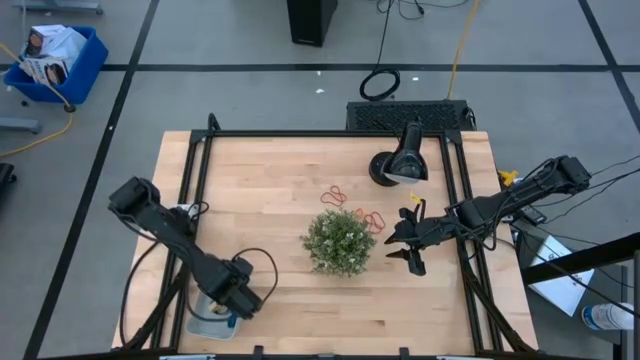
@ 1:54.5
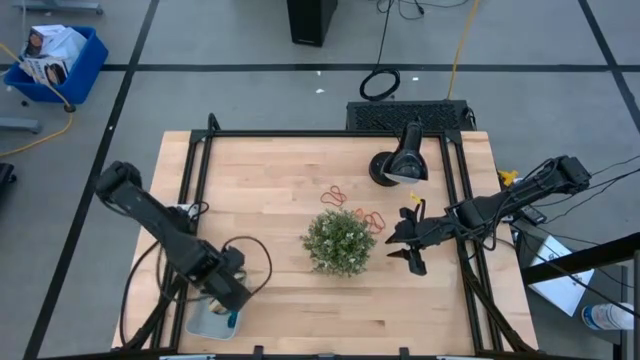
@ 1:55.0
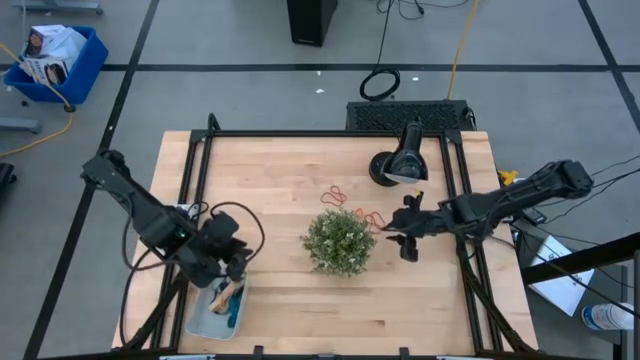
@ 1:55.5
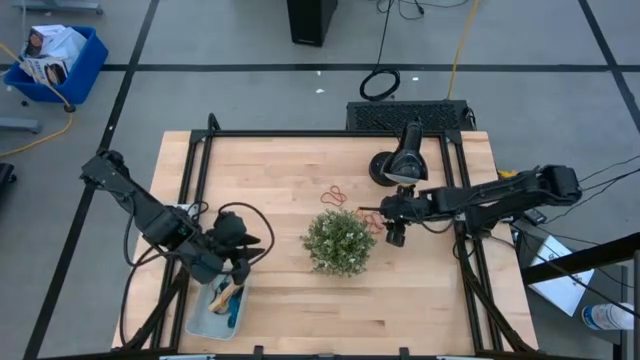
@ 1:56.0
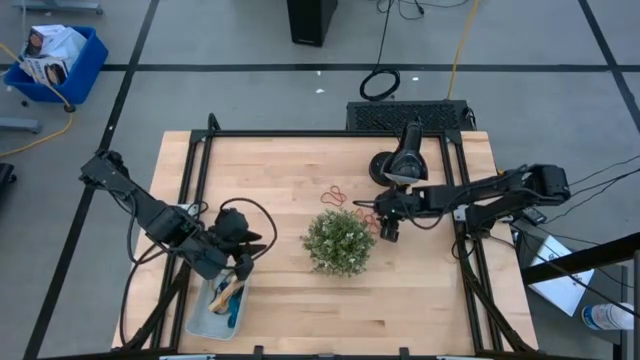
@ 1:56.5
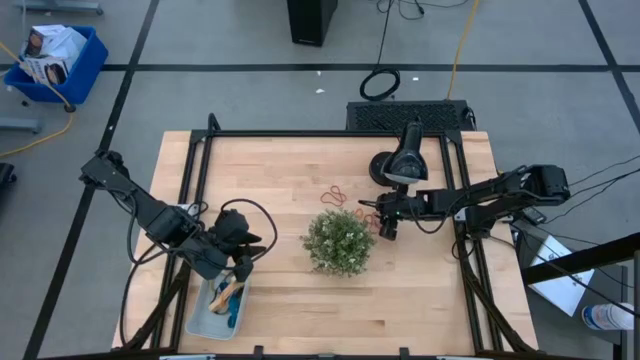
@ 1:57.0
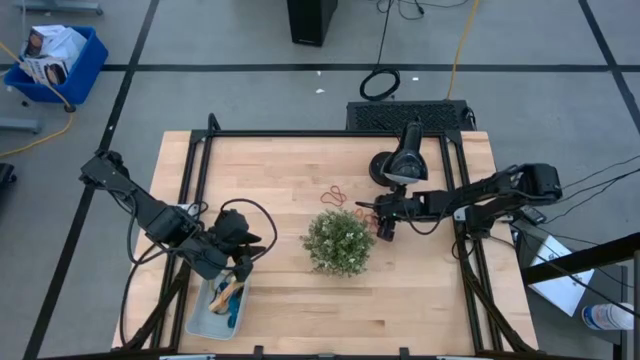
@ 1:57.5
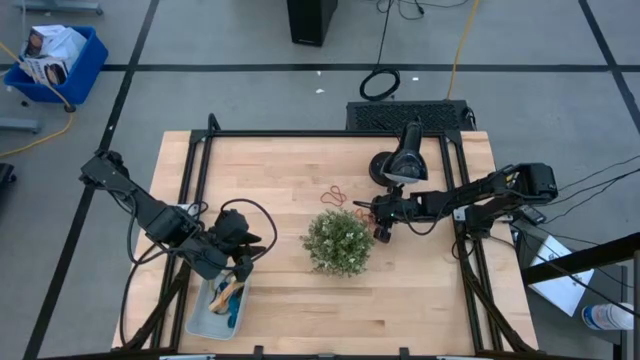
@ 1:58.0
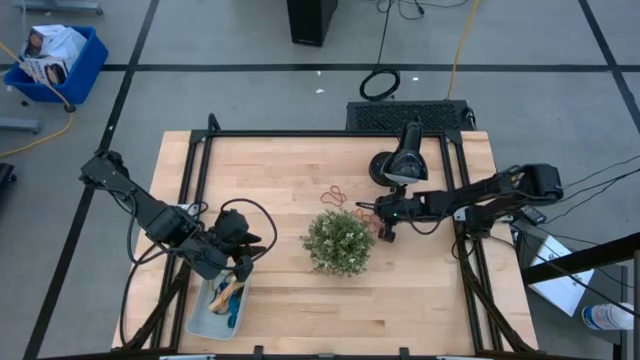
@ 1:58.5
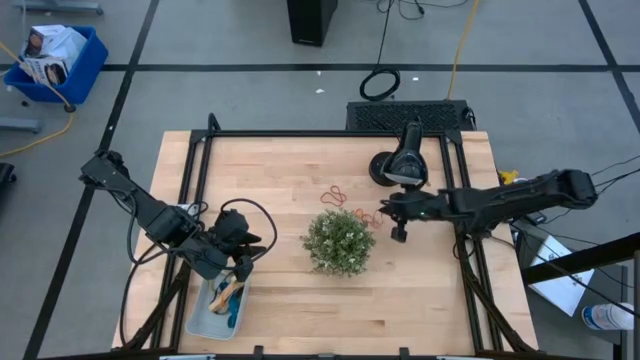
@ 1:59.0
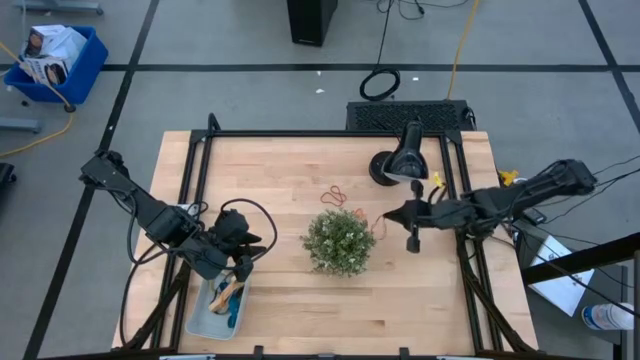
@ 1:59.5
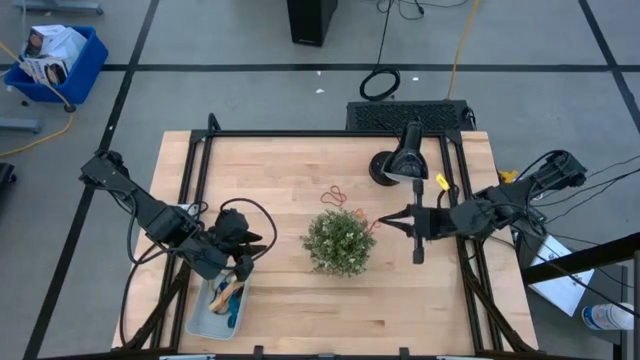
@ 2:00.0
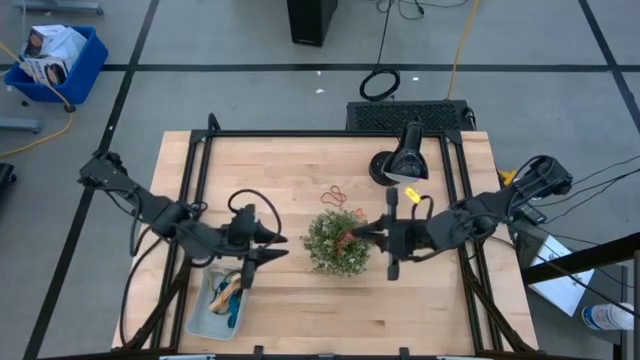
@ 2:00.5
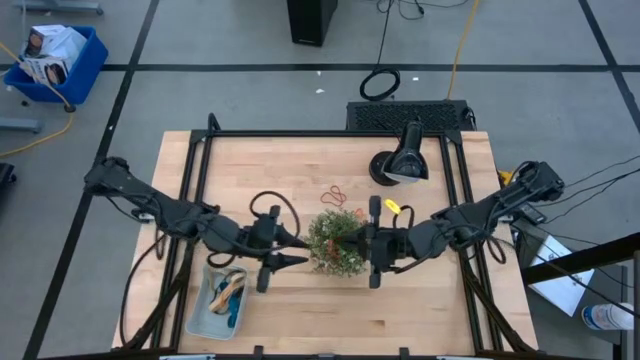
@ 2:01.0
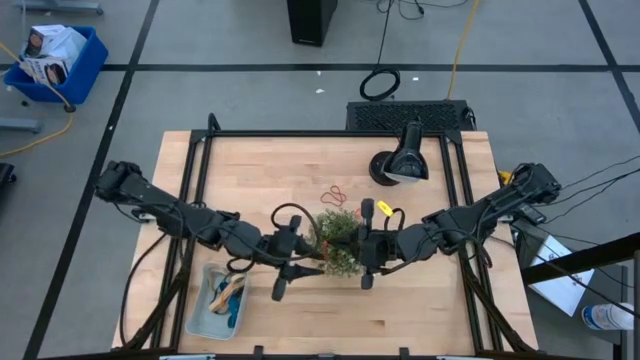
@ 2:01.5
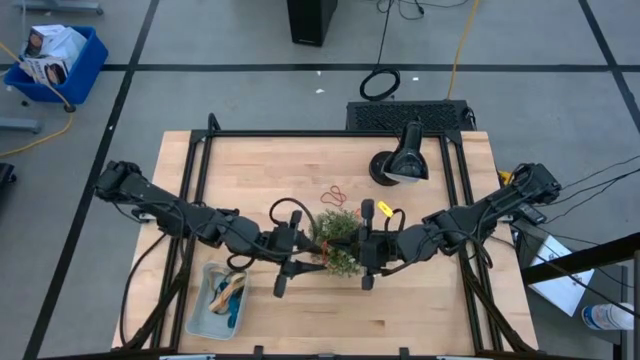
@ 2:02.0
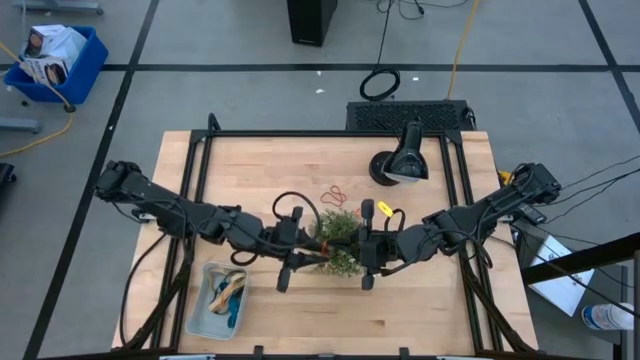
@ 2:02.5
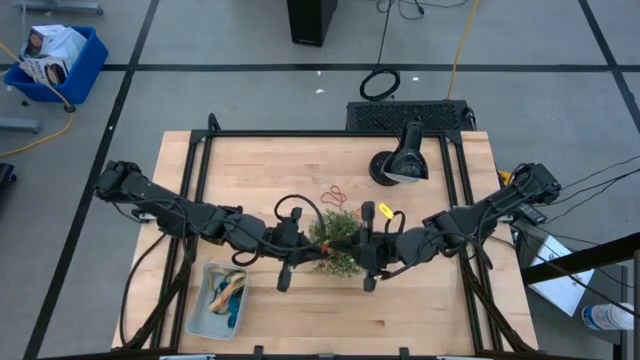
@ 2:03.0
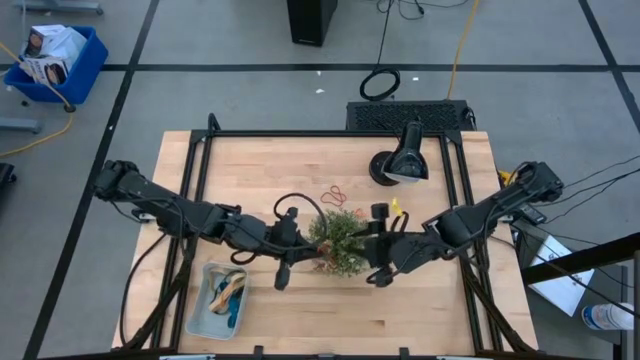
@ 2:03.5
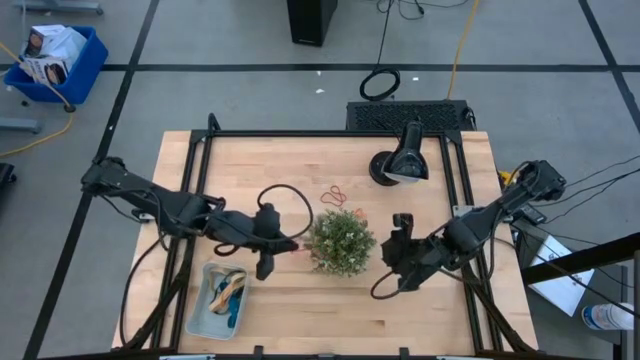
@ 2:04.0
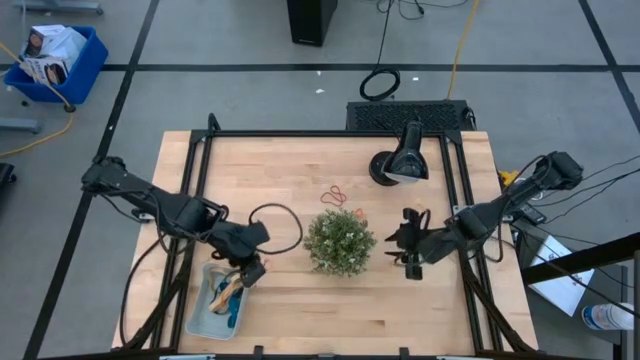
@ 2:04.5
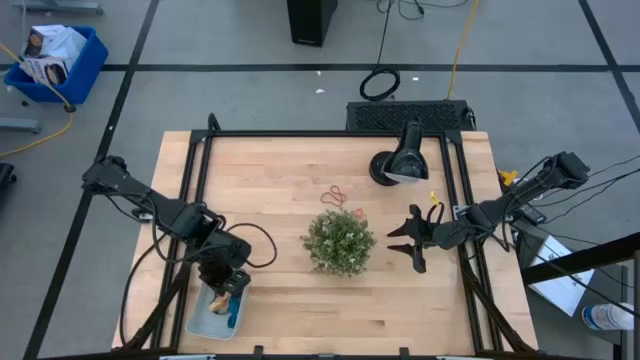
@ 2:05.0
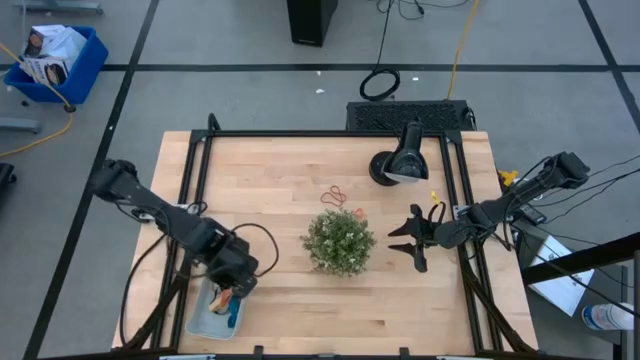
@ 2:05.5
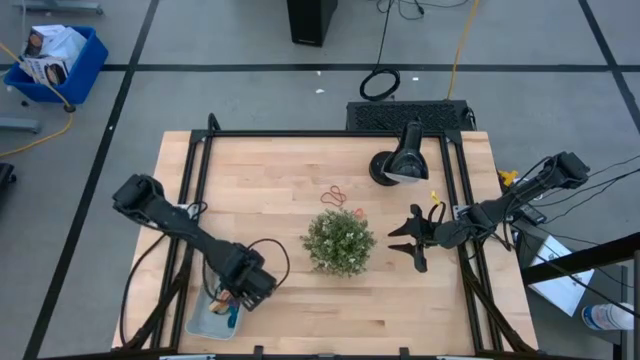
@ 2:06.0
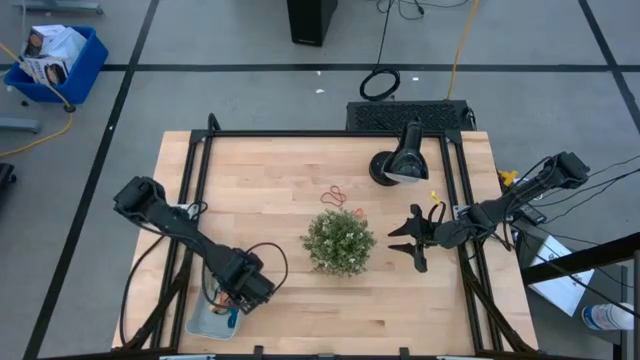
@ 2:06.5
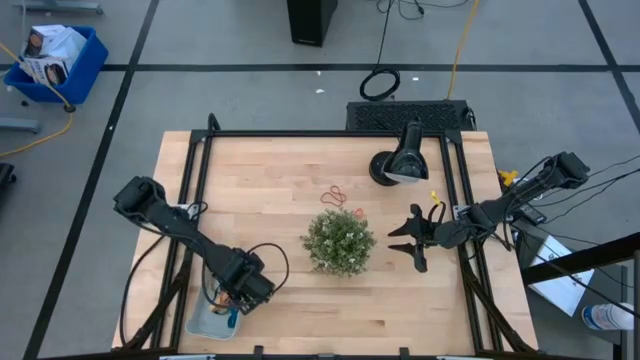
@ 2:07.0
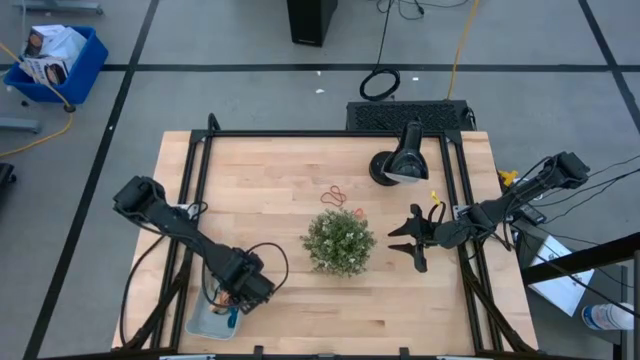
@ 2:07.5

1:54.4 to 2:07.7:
Task: Pick and place rubber bands into bin
Put the bottom red rubber band into the blue bin

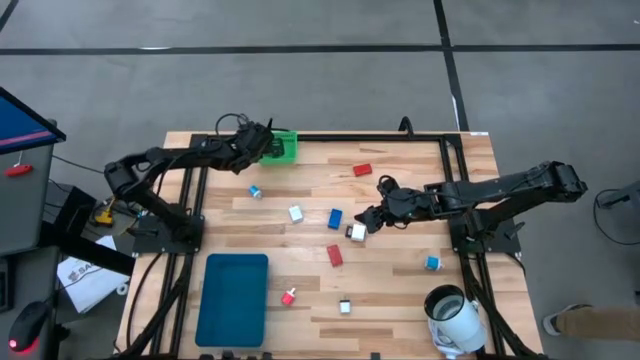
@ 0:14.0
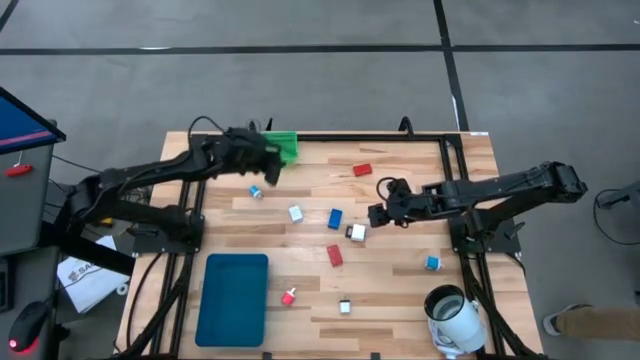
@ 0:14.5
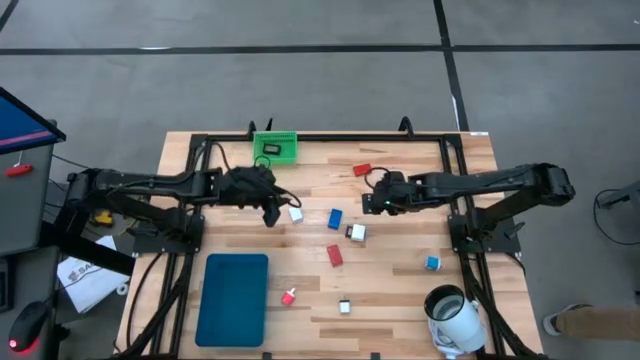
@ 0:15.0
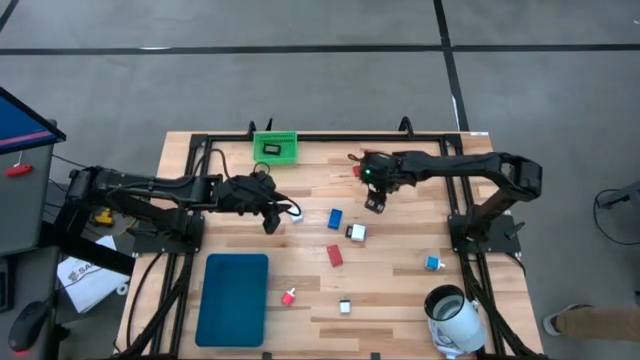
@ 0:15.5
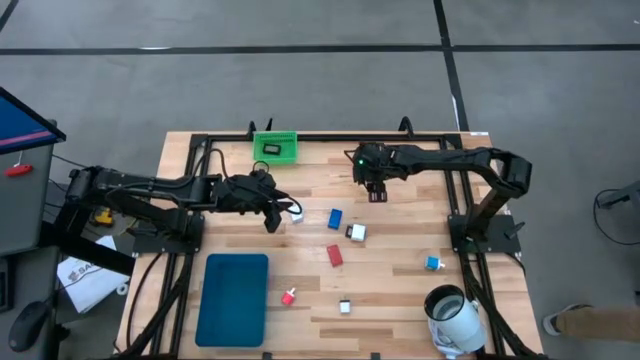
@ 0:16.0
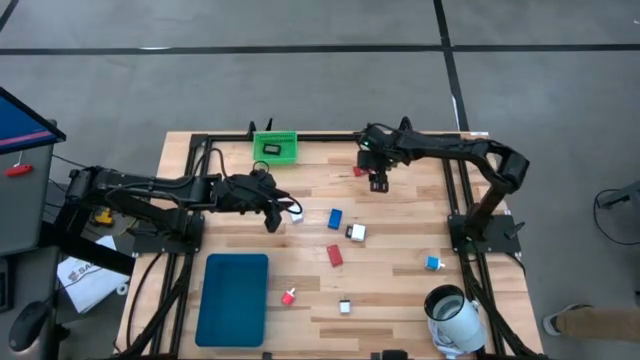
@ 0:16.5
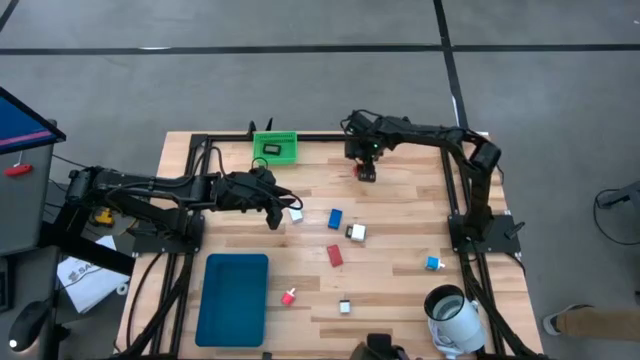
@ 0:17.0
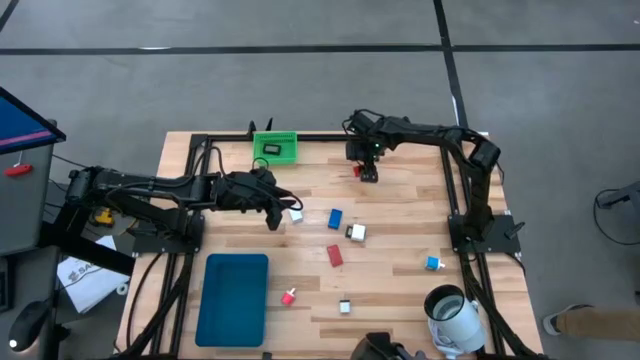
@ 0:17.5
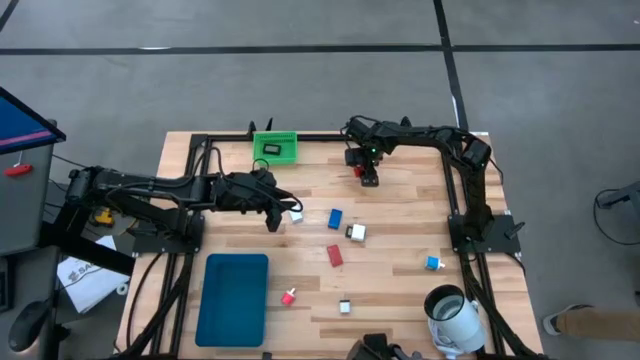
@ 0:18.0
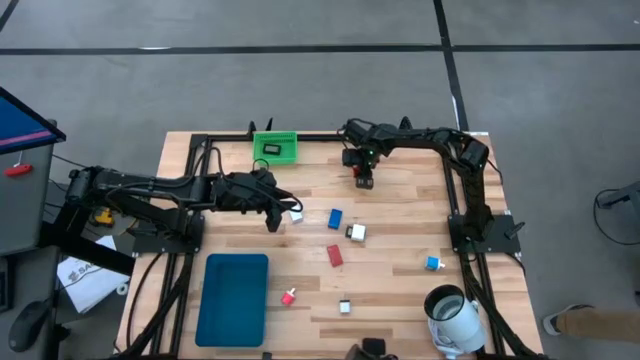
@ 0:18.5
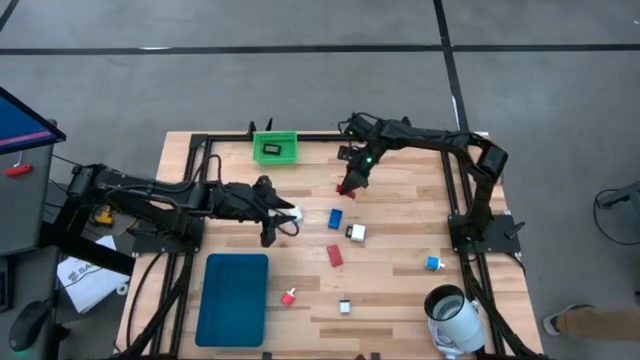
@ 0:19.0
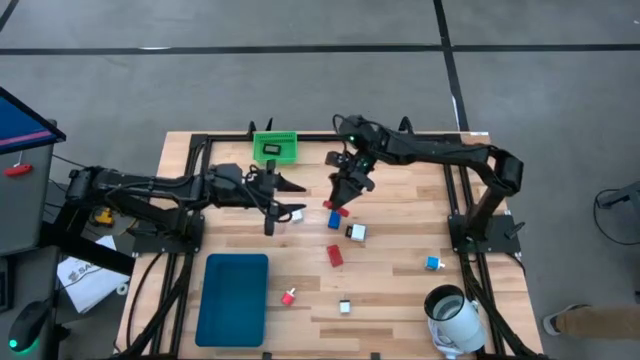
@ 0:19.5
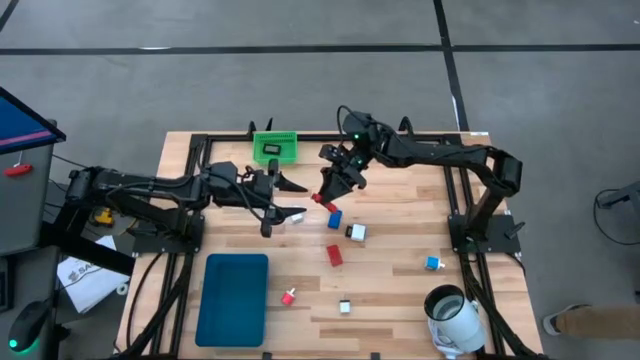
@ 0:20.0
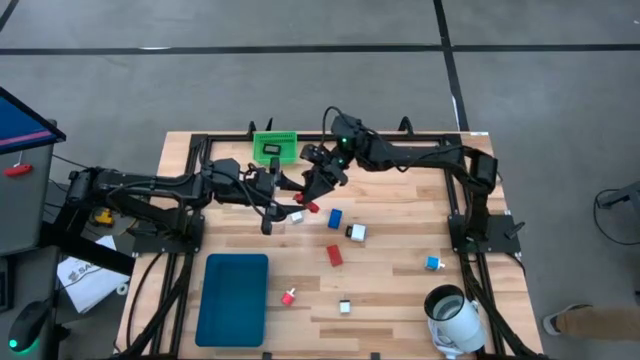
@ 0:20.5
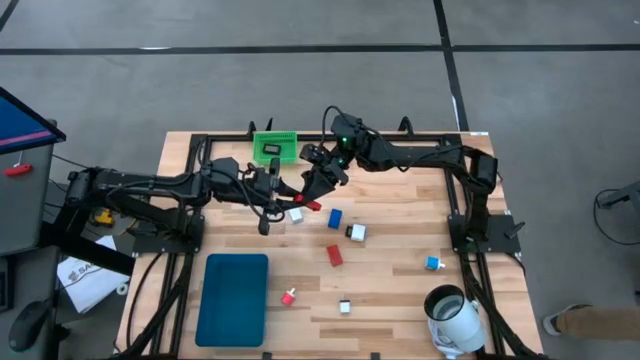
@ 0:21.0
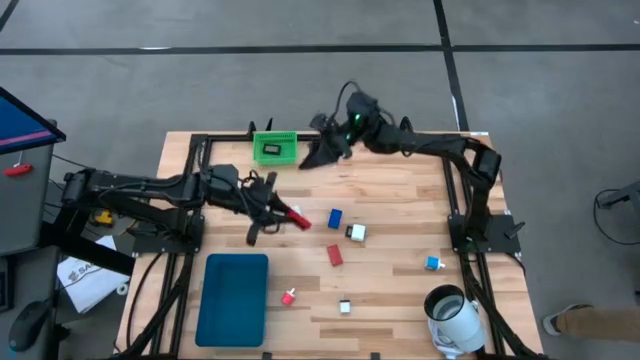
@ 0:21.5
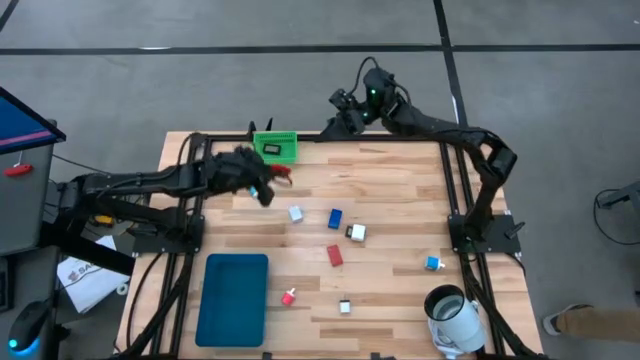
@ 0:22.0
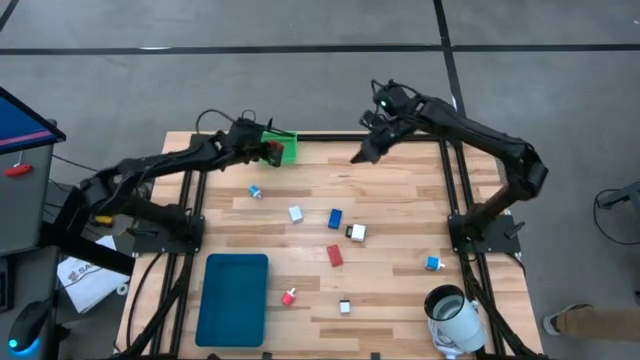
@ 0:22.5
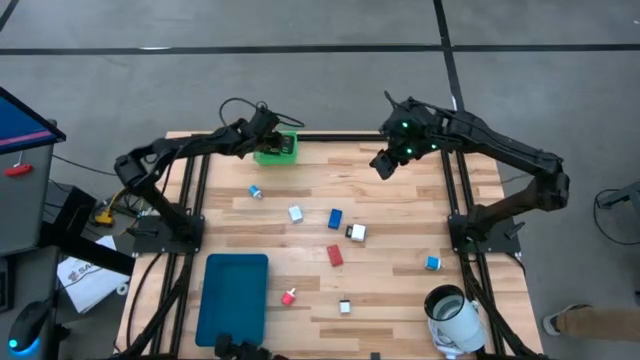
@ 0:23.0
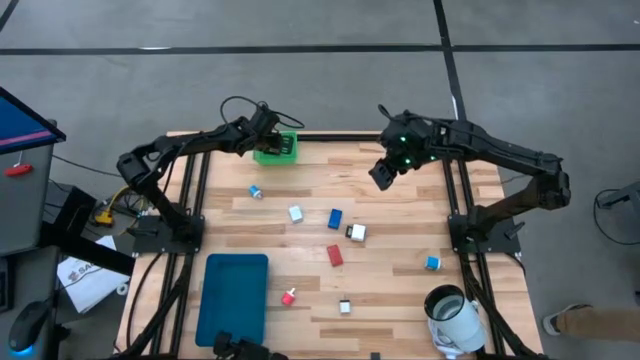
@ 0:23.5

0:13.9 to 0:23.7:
Task: Pick & Place Office items
Put the top red digital clock into the green bin
